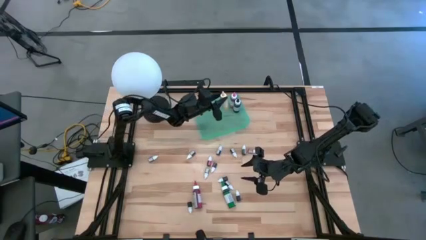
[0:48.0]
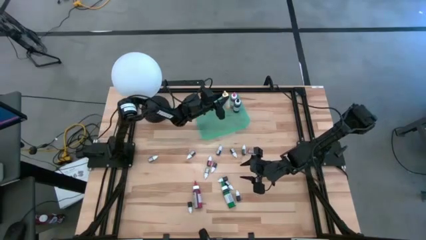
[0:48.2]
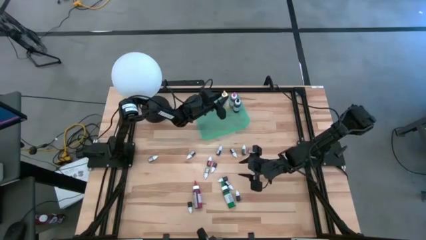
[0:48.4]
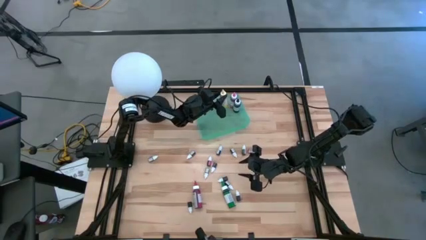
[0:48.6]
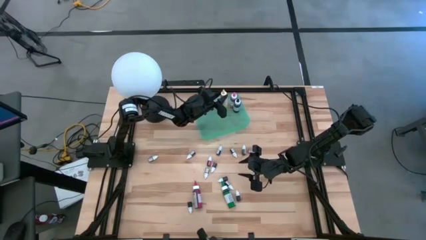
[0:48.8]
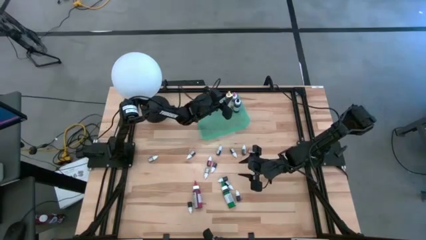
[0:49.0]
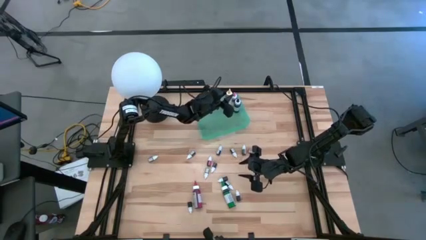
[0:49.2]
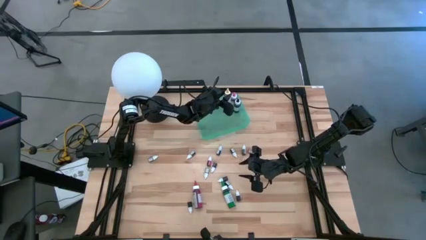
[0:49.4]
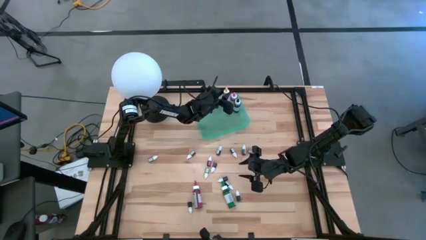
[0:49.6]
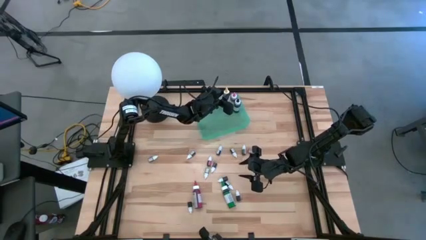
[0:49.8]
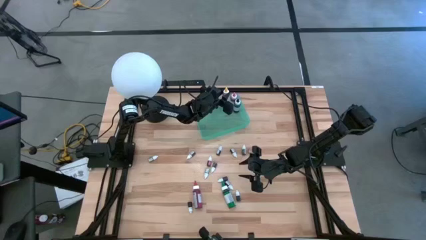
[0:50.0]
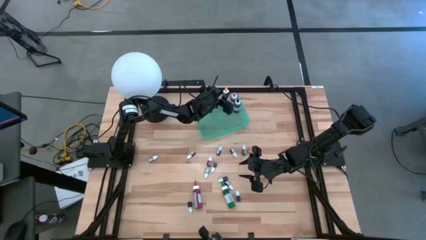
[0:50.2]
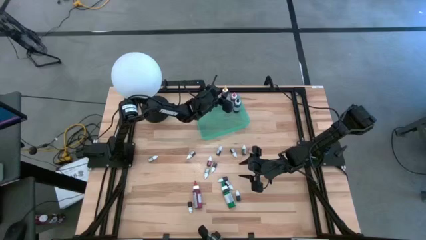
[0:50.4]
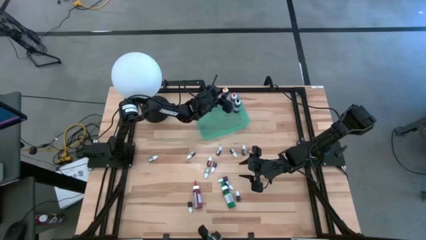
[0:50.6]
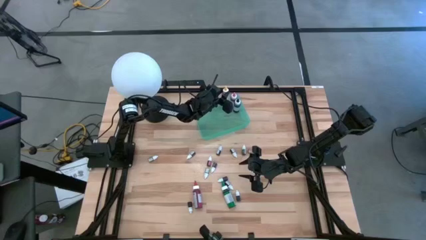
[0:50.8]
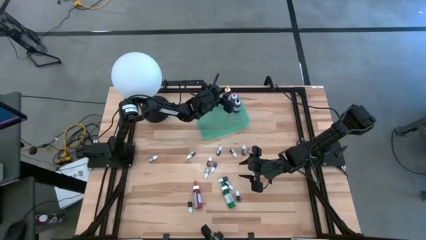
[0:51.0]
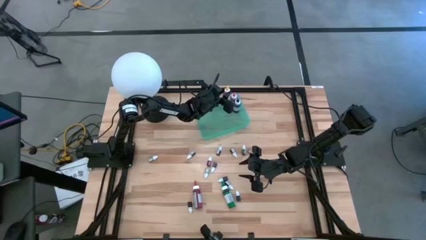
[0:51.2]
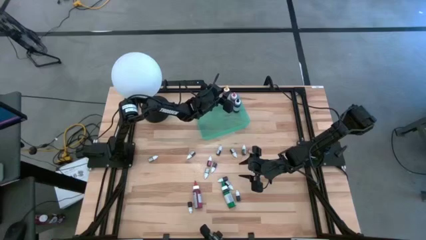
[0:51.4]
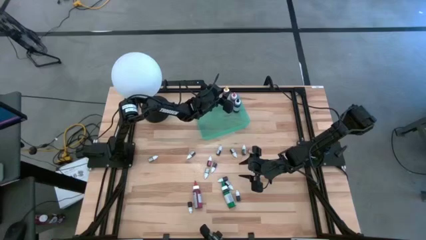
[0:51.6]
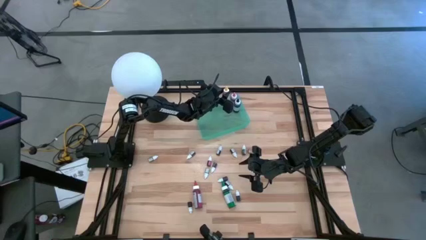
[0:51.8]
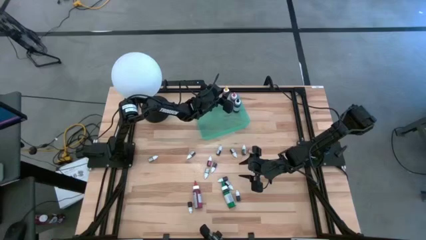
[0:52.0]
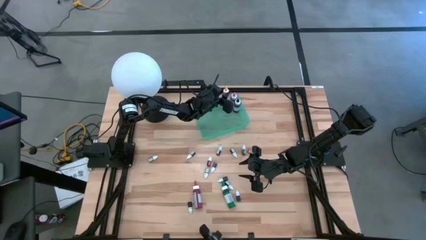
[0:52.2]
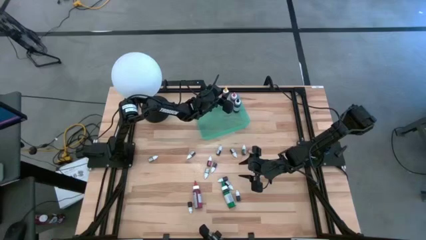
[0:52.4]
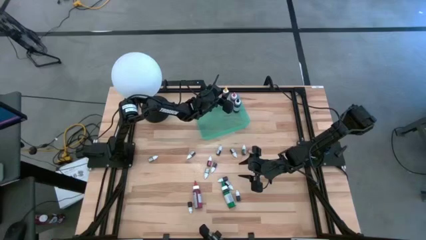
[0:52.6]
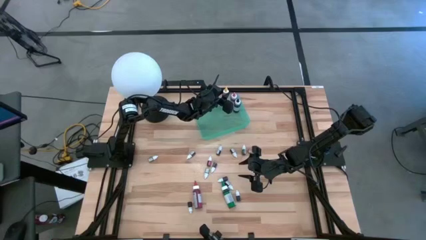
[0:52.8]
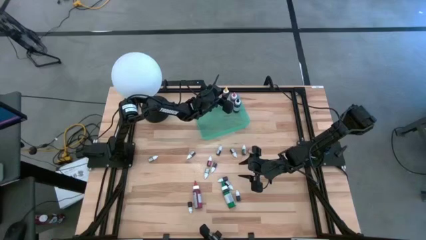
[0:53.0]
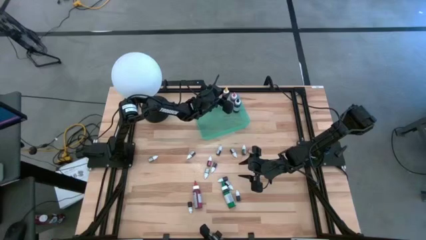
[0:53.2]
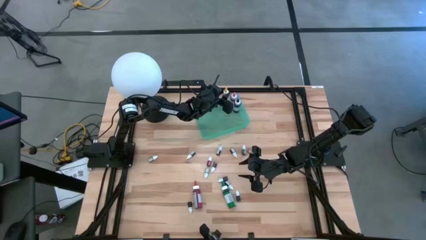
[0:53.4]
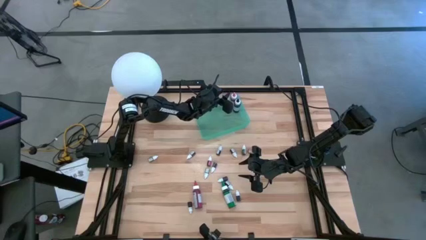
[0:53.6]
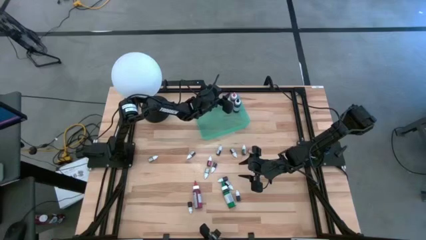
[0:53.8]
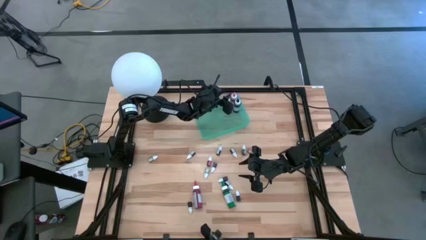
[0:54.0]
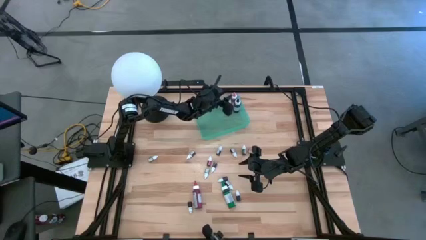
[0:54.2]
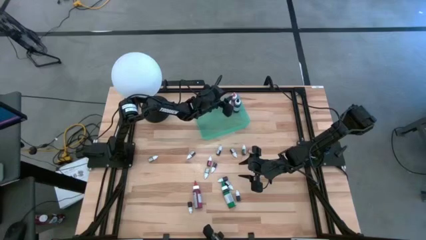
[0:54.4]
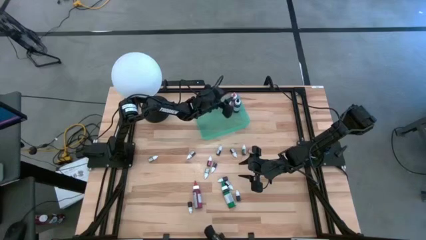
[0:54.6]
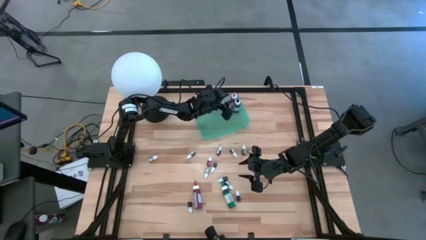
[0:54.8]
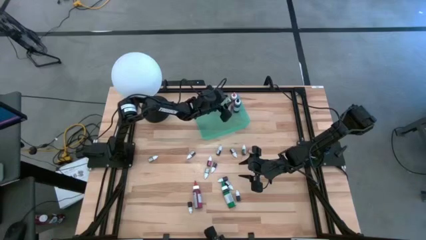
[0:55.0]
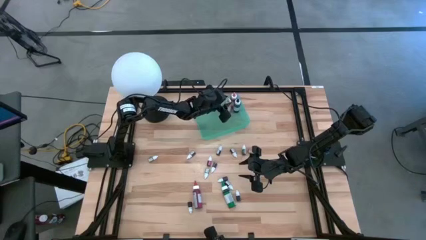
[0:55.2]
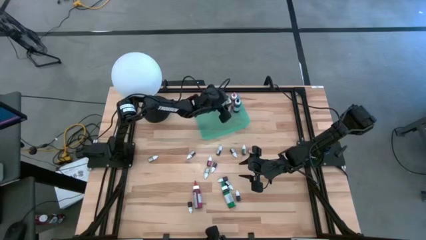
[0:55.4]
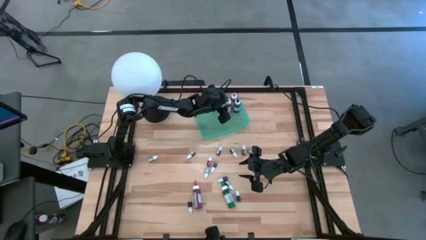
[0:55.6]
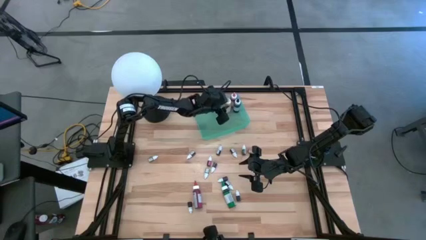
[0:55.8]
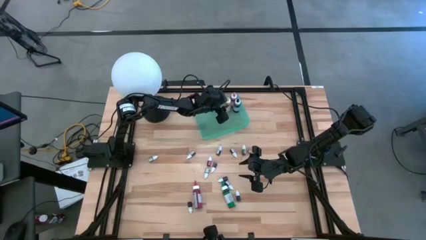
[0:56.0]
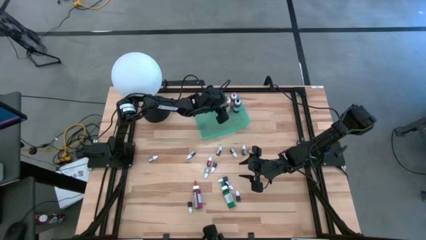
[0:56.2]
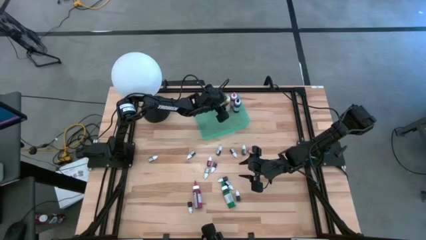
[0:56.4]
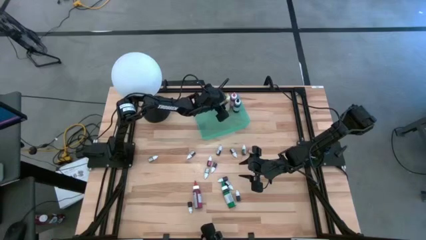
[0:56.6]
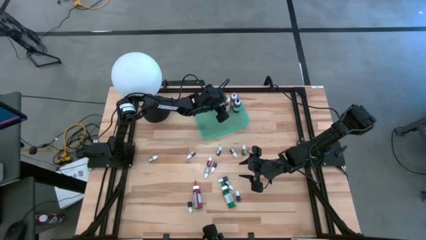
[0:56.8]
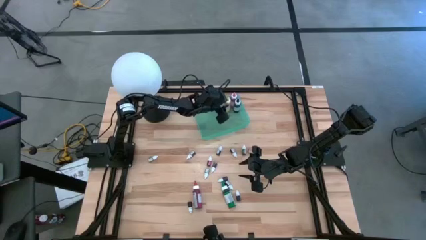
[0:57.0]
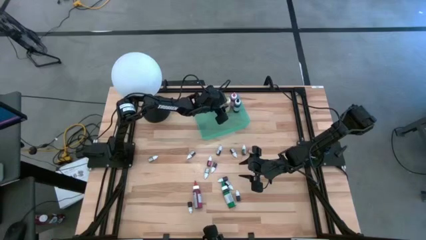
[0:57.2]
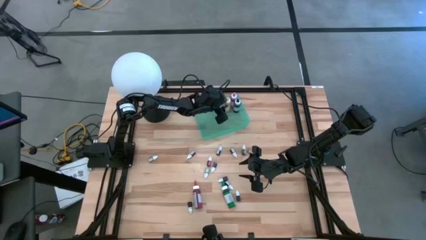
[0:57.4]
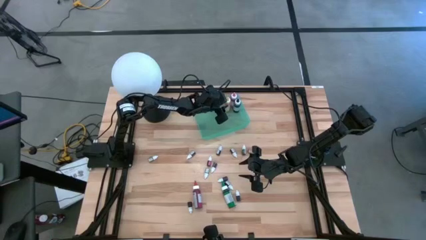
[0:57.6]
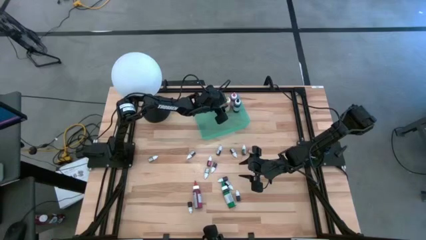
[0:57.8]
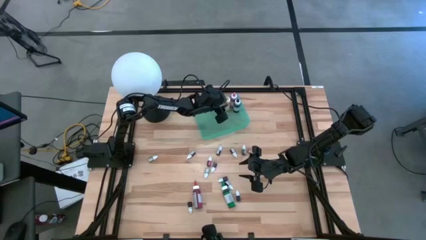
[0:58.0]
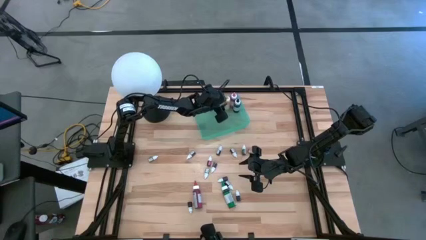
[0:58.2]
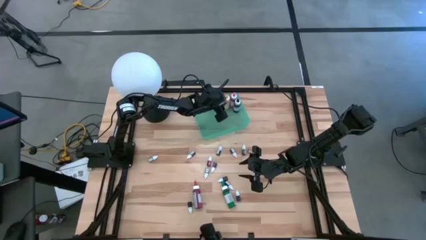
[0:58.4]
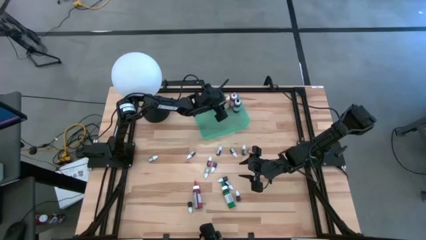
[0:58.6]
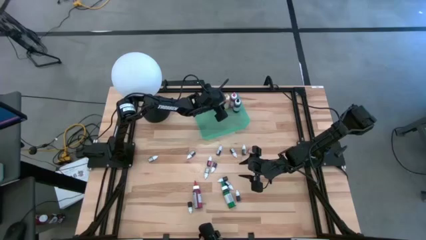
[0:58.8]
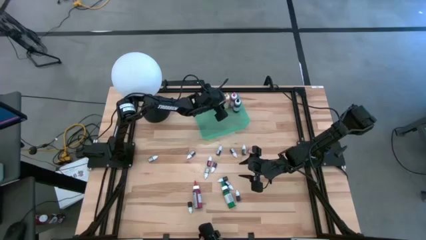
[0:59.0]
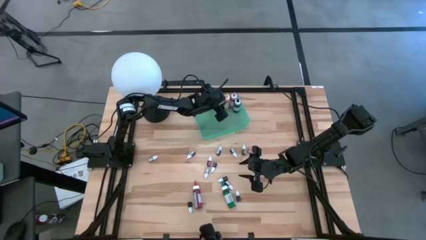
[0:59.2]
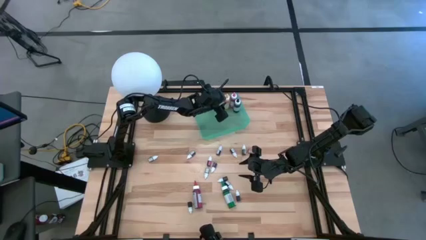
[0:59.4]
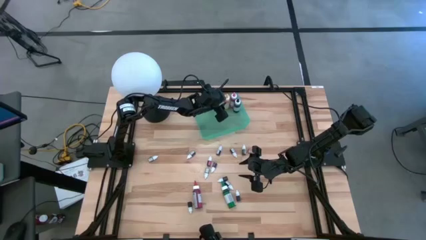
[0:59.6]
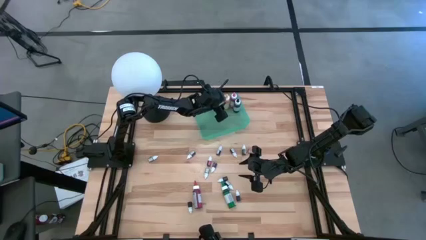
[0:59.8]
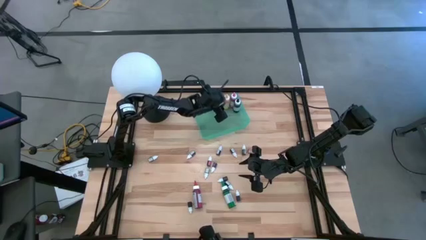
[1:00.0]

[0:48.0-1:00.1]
Task: Pick & Place food coloring
Put the yellow food coloring bottle into the green bin

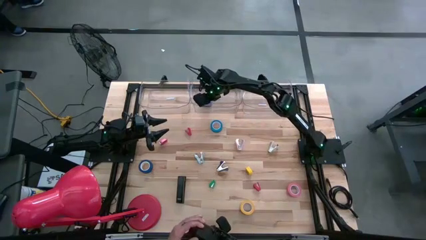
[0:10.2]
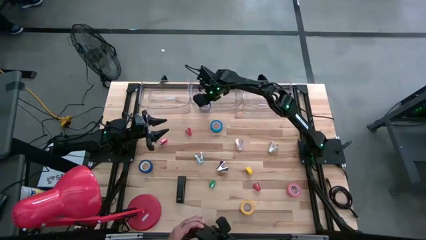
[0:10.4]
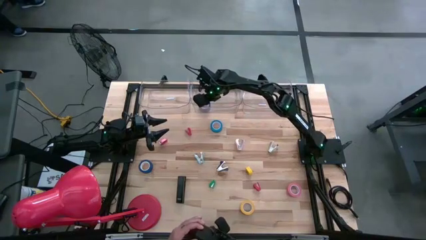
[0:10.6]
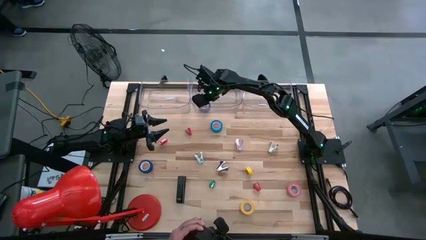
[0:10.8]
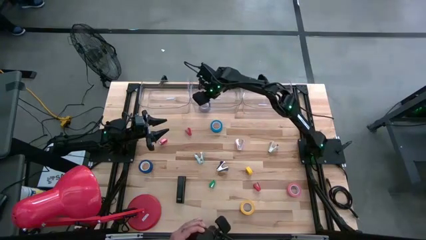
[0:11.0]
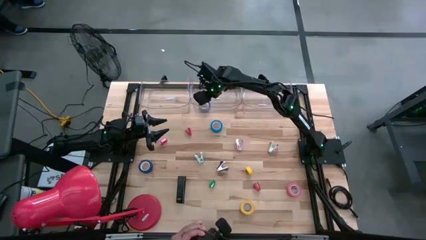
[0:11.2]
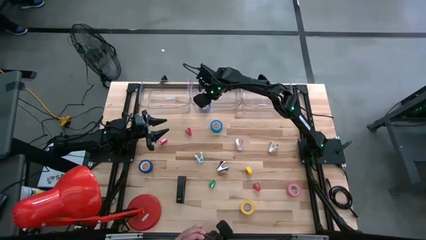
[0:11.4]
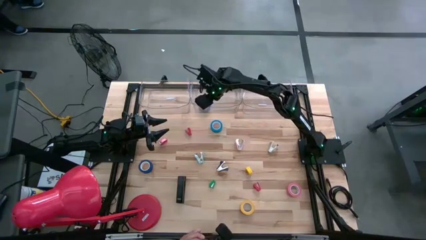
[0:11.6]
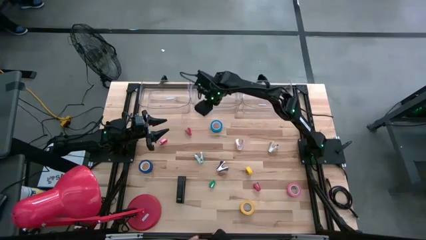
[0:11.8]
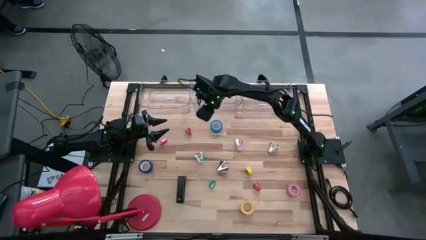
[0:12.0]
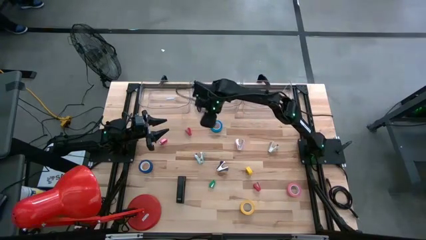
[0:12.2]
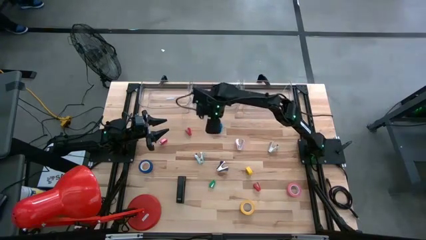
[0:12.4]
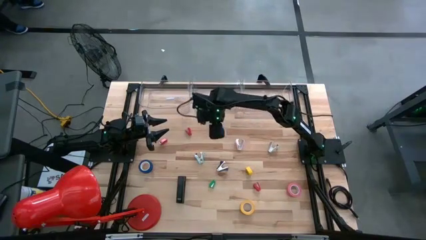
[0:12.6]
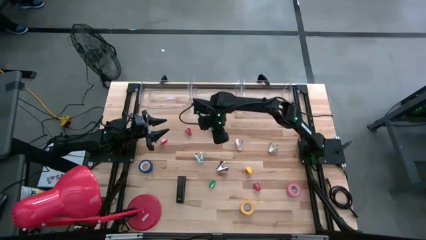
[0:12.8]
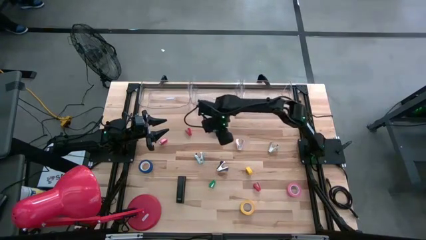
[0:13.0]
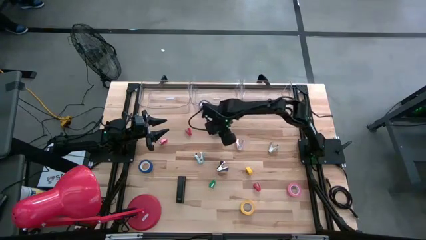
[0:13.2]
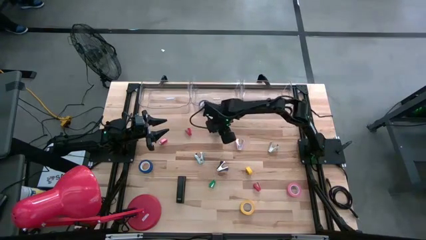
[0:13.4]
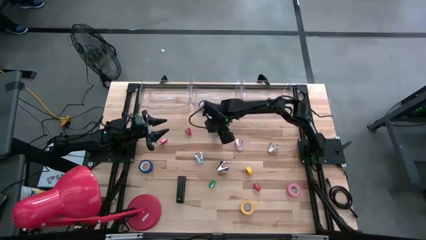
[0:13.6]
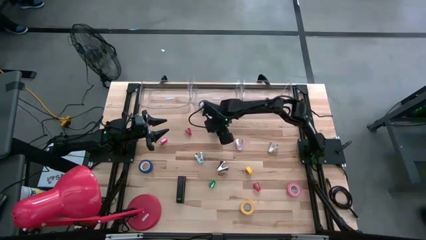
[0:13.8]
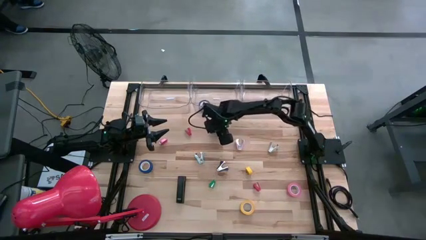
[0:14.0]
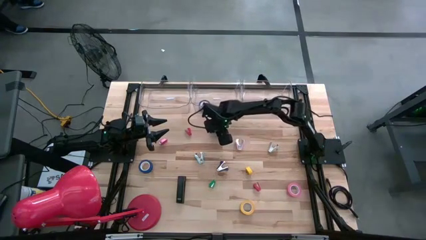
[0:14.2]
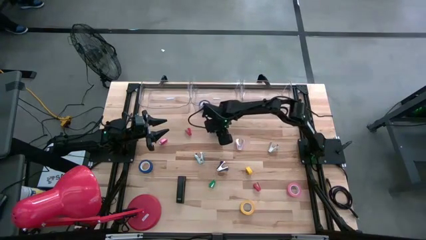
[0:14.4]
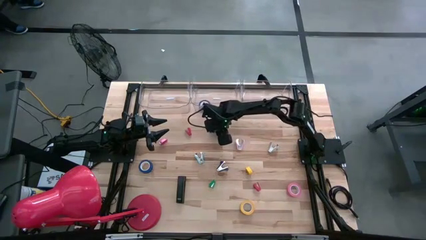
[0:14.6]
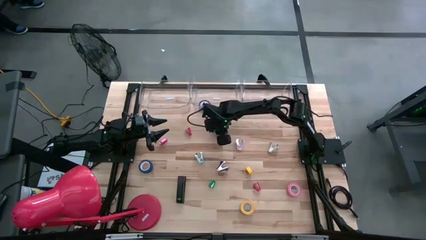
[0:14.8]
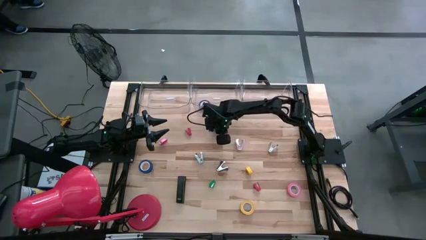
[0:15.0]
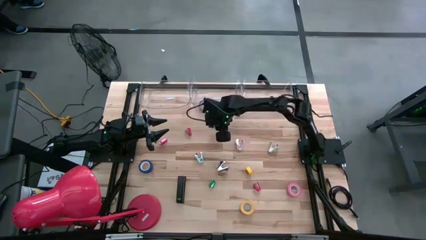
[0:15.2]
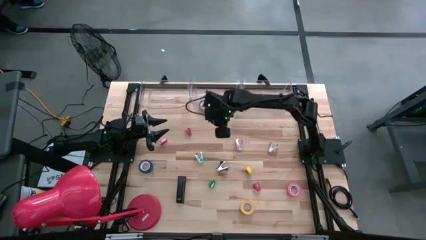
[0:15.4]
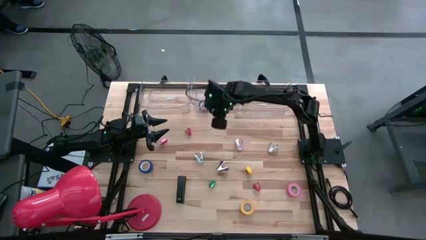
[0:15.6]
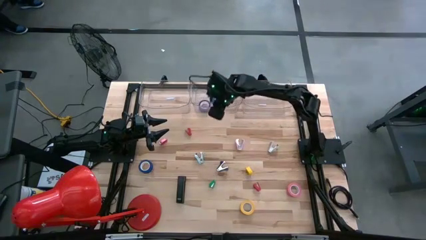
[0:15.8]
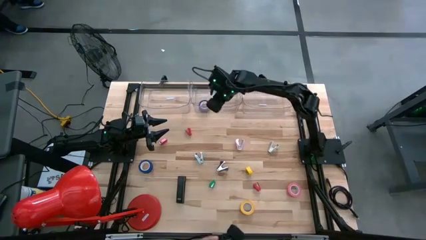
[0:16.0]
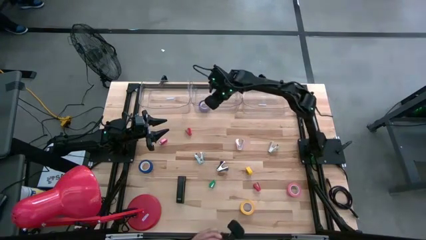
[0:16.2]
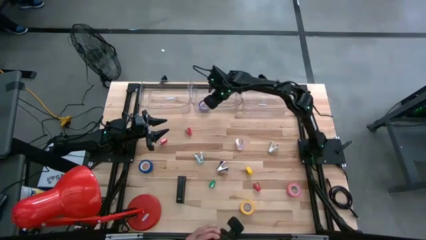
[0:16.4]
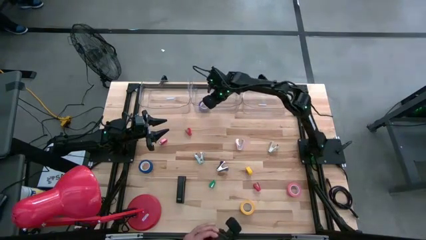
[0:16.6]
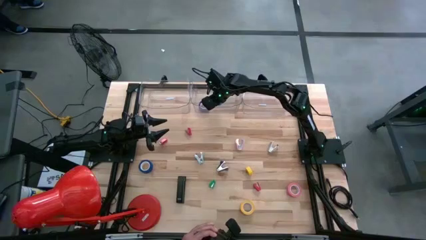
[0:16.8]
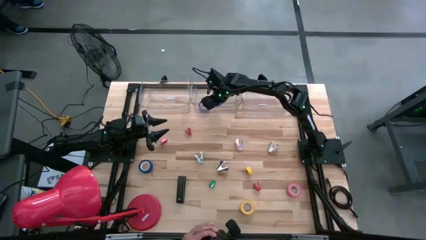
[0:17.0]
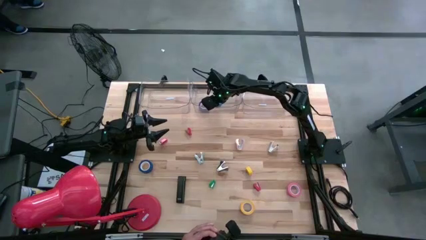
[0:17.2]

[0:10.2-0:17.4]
Task: Pick and place Stapler, Stapler remover, tape
Put the blue tape into the middle transparent bin
